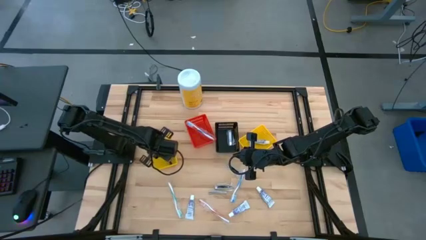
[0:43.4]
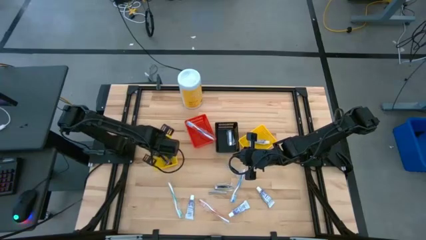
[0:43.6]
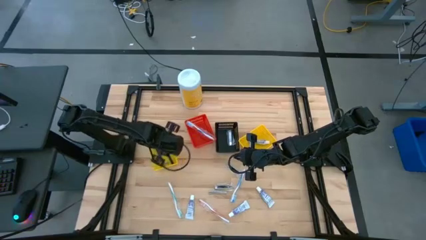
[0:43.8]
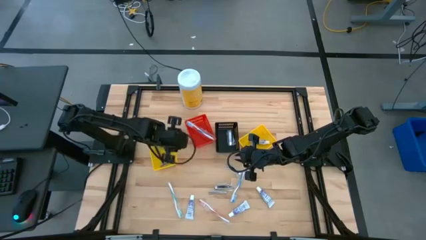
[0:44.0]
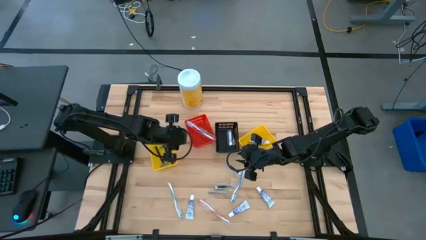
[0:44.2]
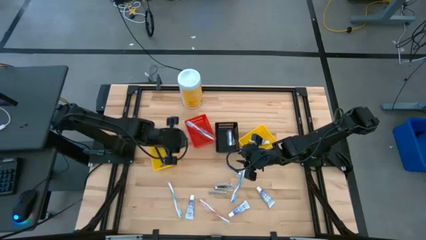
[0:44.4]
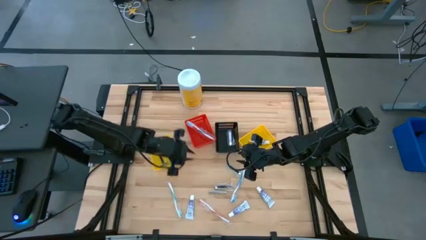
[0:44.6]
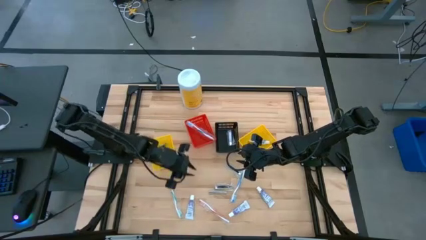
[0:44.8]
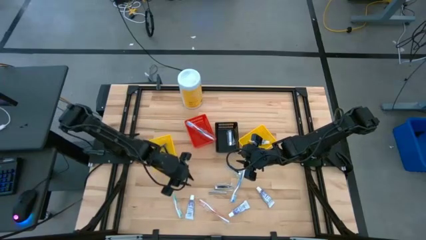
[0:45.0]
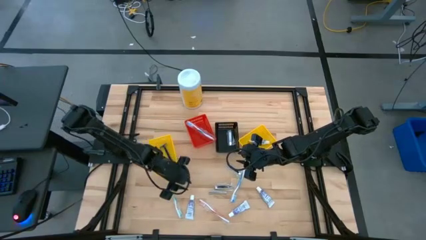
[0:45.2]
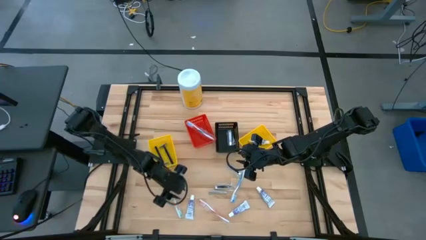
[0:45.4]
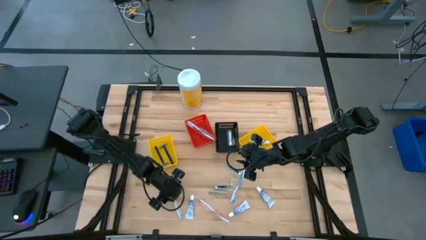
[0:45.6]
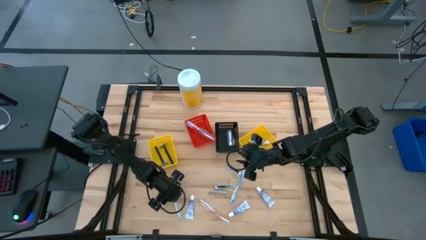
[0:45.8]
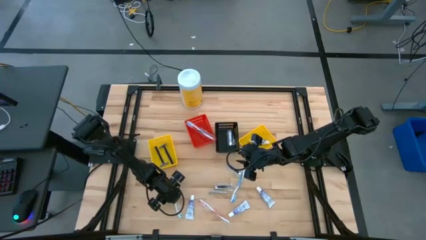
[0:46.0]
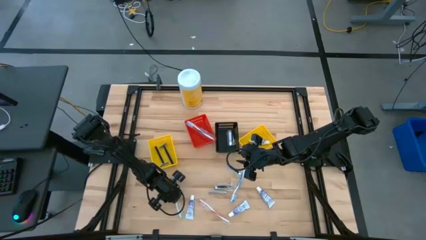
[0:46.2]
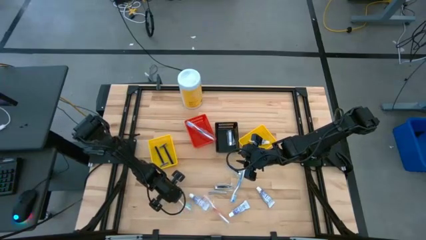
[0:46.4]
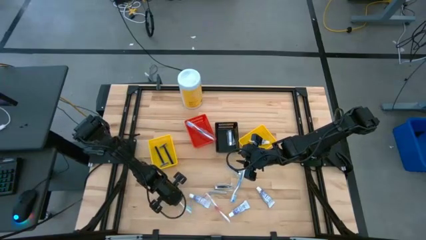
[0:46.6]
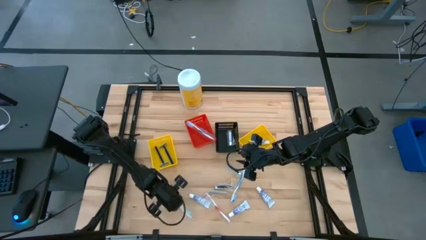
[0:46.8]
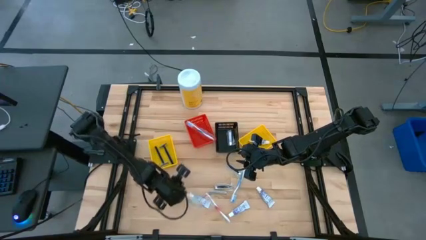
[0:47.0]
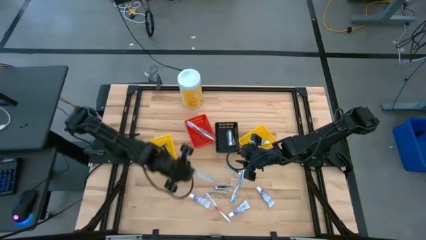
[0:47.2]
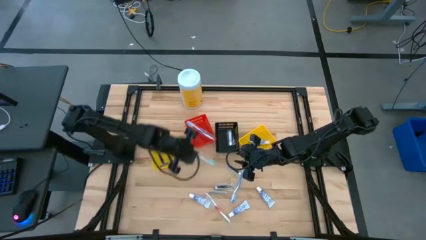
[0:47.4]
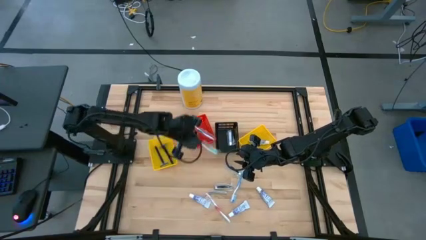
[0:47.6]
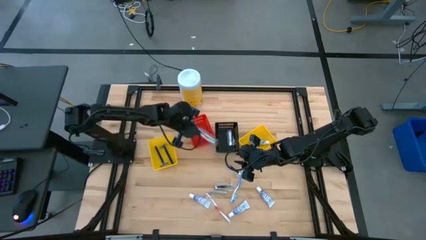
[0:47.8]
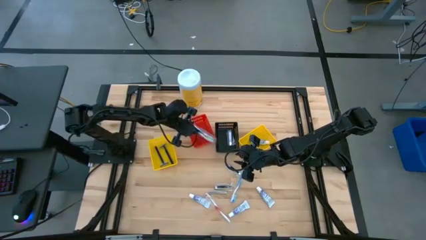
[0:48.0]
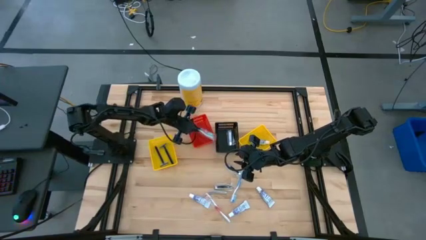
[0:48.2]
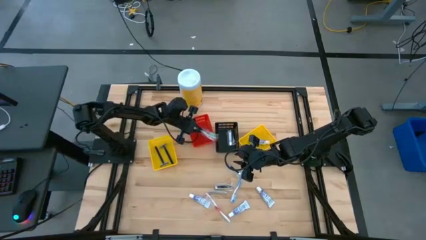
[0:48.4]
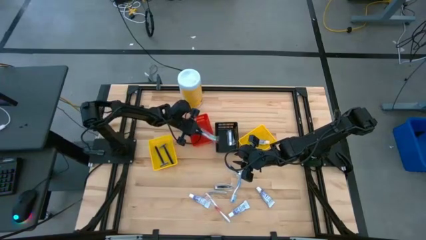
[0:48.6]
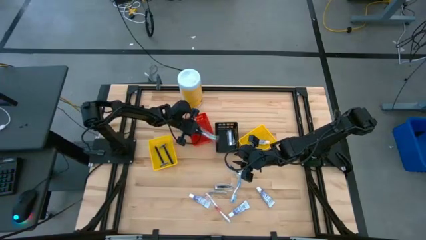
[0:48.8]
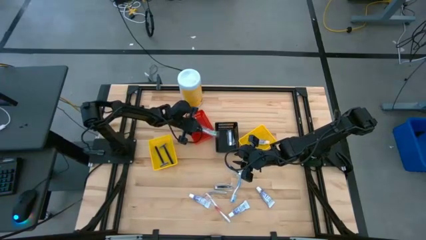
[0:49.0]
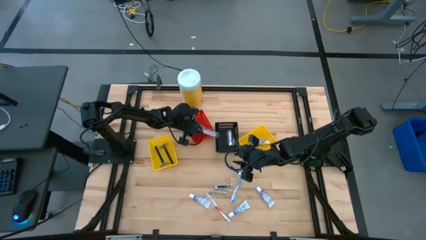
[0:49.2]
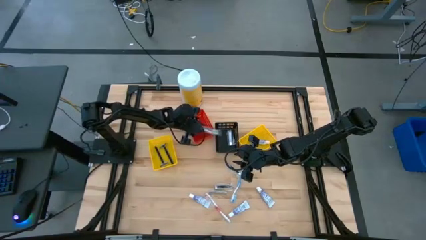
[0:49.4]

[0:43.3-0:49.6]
Task: Pick & Place Travel size toiletries
Put the green toothbrush into the red bin

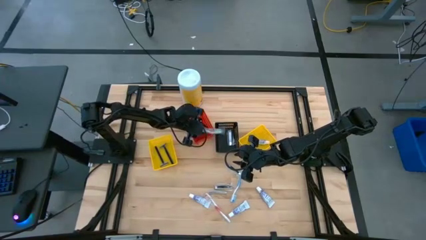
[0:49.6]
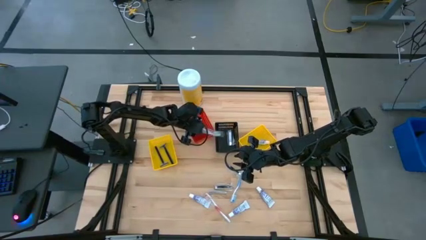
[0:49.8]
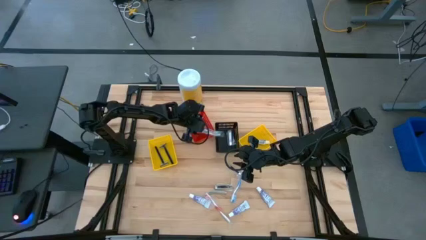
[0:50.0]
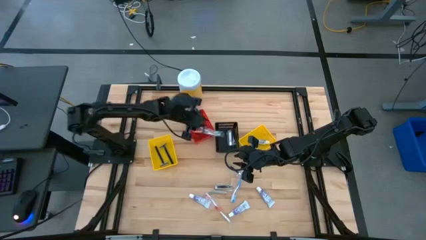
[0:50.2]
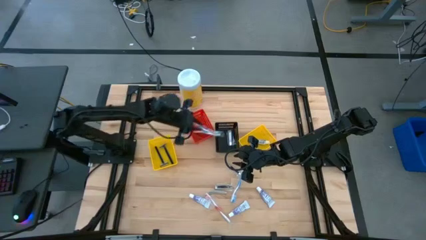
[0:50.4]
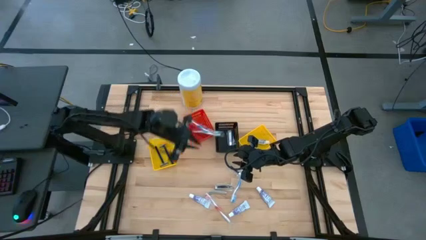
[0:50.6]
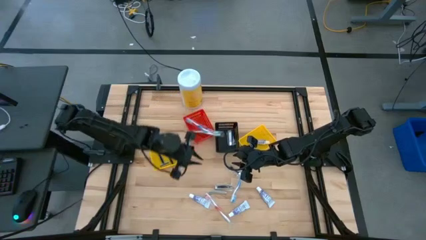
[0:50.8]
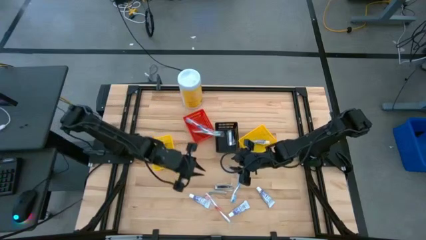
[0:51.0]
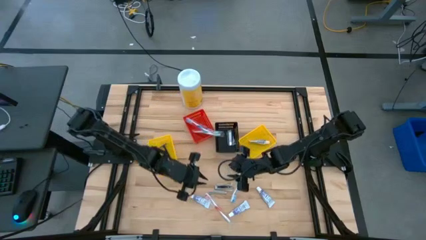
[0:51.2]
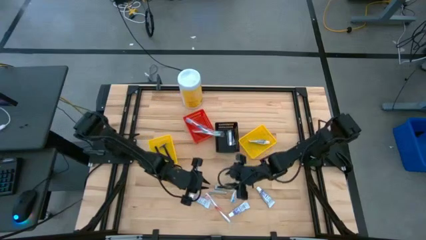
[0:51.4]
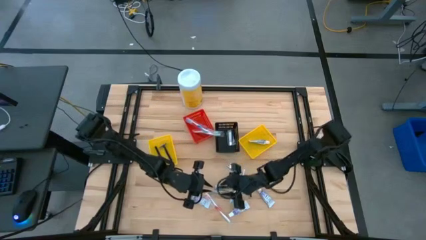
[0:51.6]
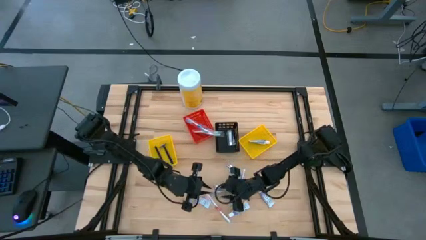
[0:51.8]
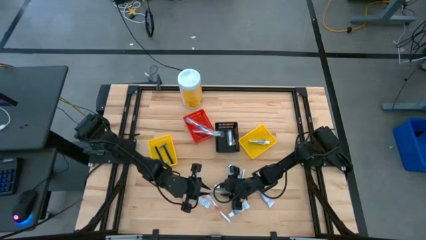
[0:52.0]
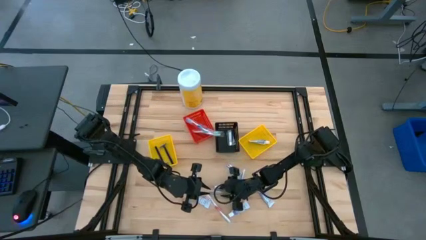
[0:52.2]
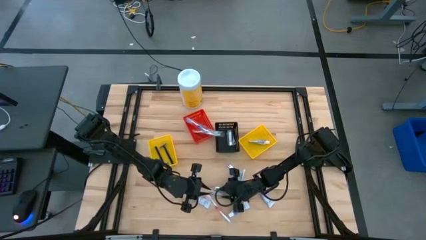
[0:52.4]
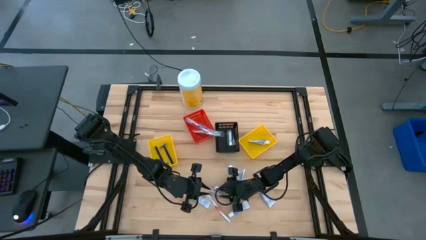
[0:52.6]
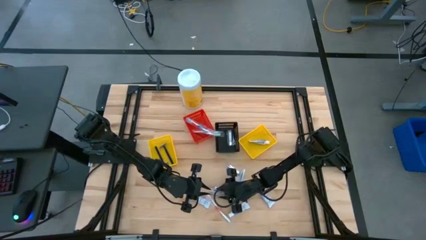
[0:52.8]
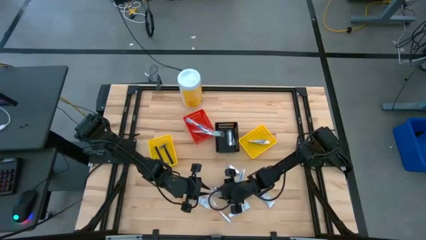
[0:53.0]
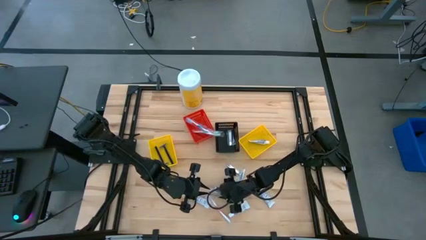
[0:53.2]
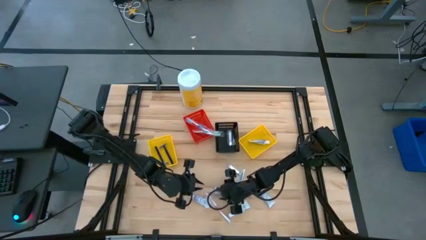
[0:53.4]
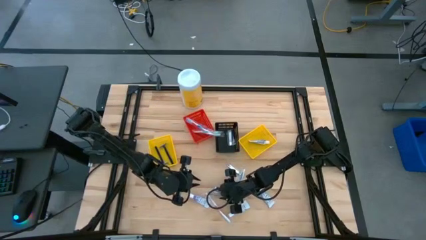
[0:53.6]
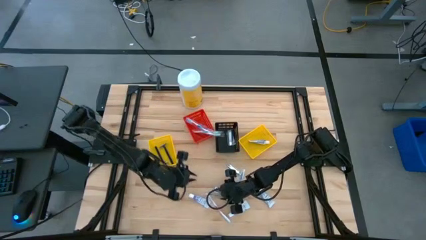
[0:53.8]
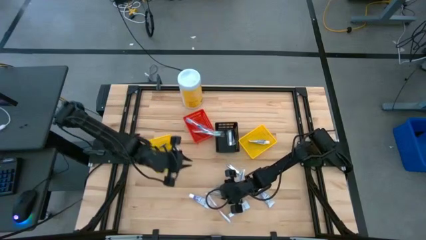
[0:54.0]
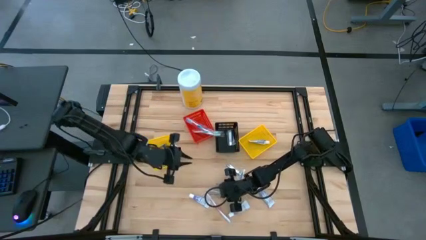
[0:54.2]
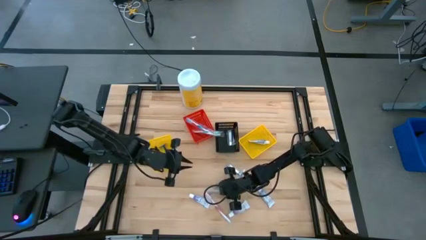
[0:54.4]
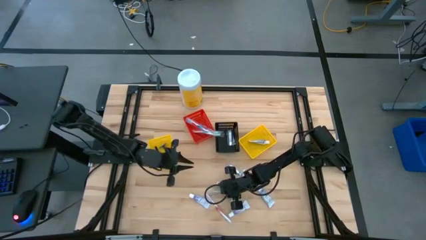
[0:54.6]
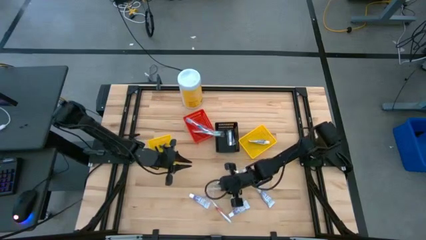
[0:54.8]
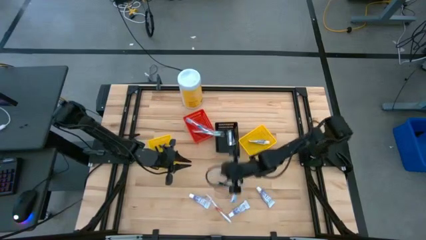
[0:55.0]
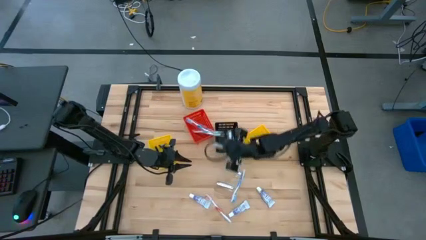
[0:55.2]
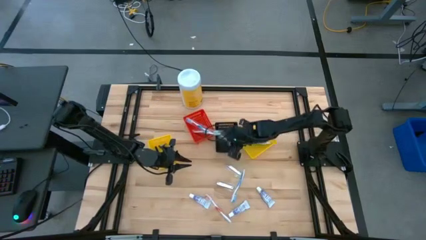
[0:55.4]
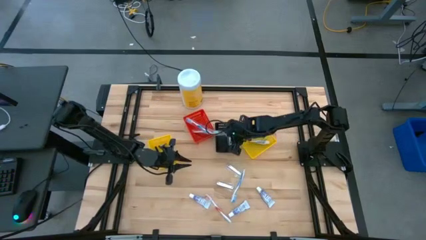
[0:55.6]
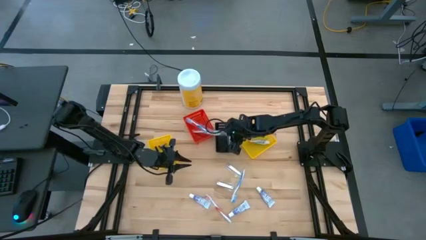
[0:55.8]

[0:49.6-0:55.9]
Put the silver nail cutter into the black bin

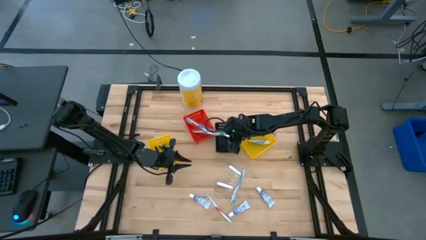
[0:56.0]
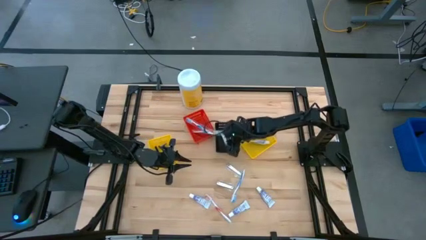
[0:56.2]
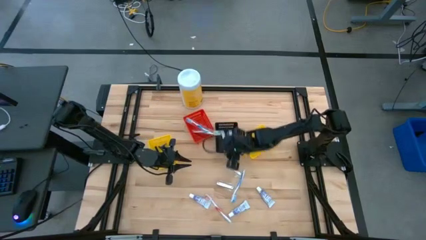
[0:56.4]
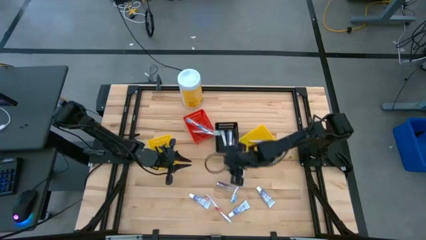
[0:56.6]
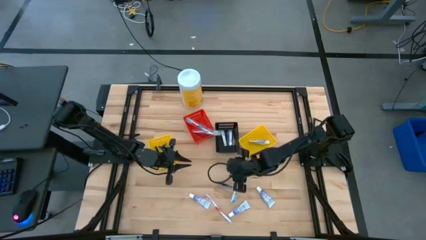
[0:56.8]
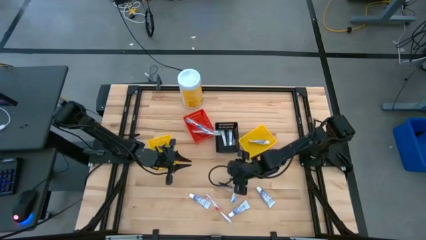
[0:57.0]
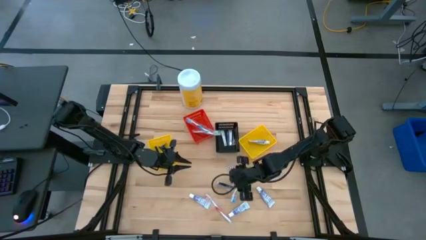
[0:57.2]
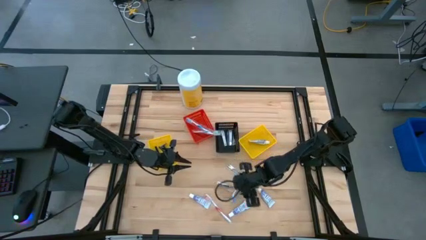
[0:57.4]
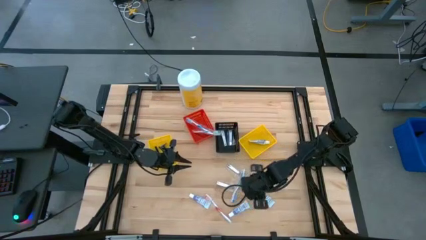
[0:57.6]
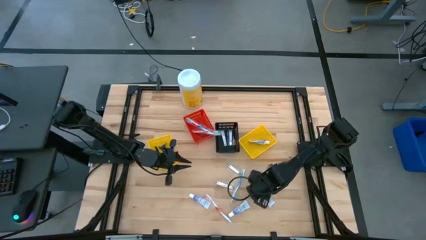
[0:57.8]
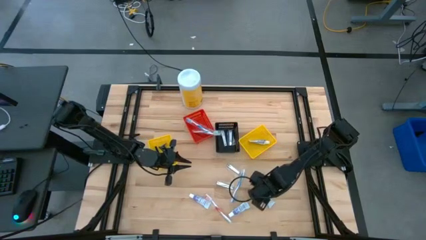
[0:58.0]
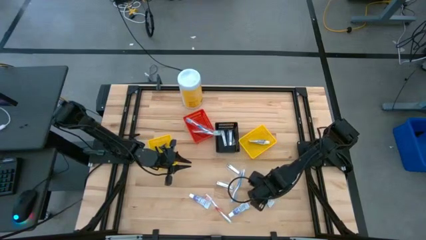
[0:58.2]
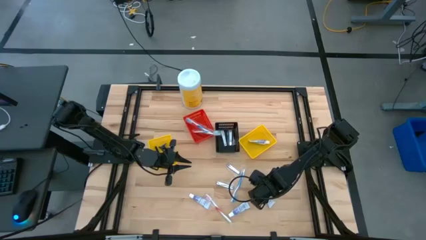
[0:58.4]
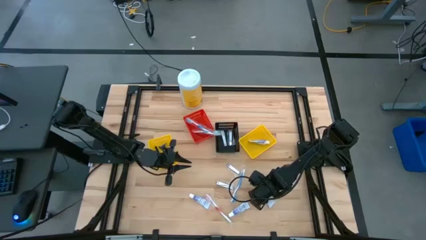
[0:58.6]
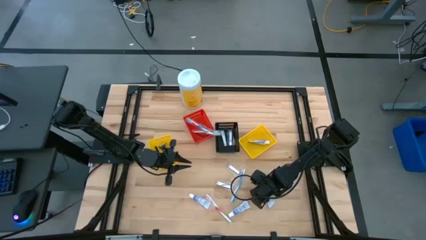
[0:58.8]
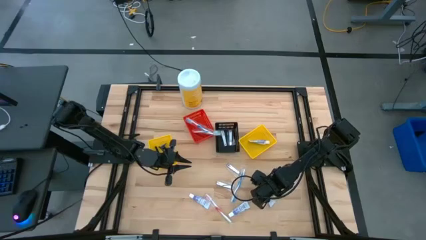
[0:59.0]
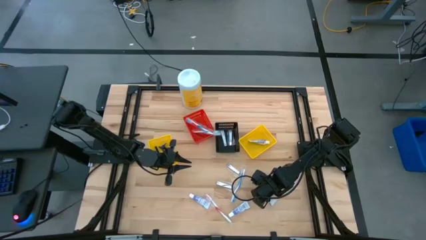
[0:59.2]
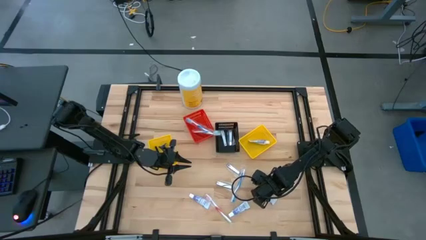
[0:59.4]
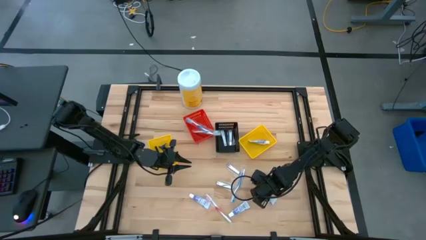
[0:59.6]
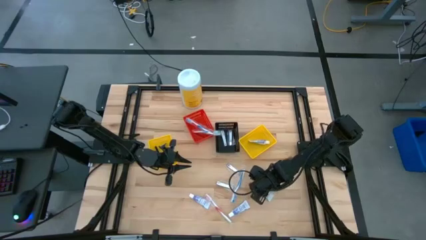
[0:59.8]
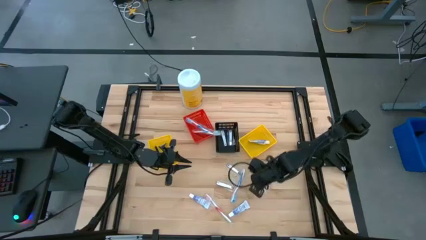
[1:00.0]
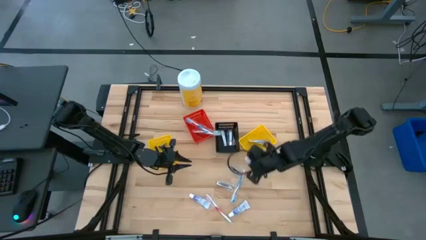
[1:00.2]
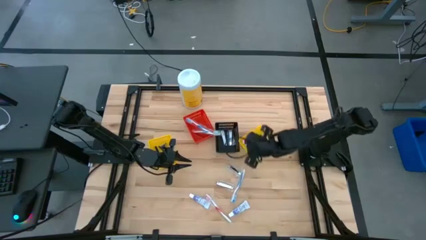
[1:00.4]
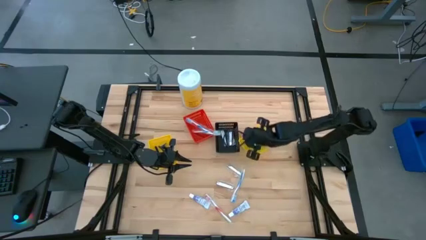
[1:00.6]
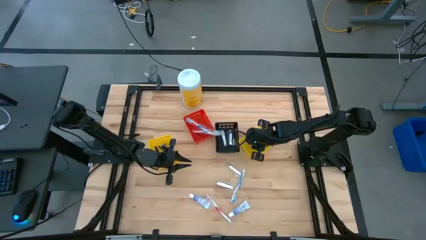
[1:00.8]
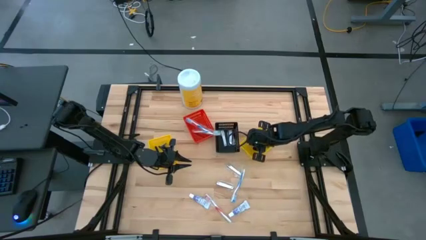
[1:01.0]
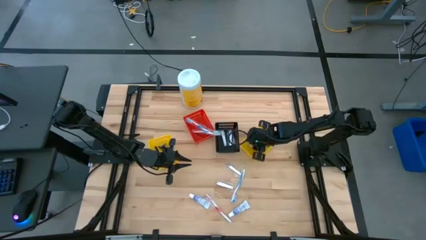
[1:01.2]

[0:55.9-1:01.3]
Put the white toothpaste into the right yellow bin
